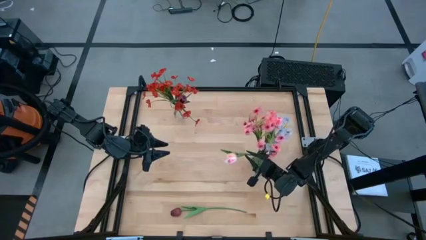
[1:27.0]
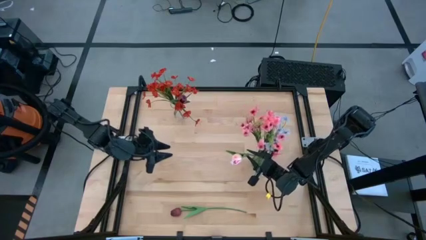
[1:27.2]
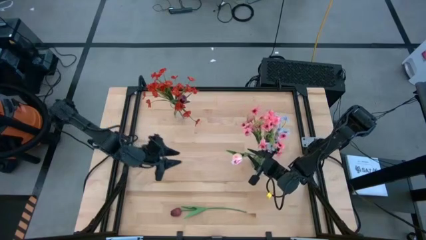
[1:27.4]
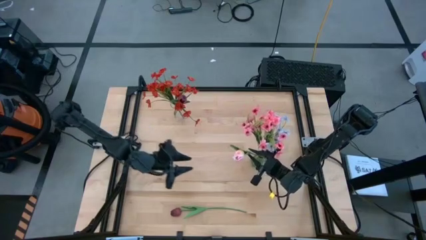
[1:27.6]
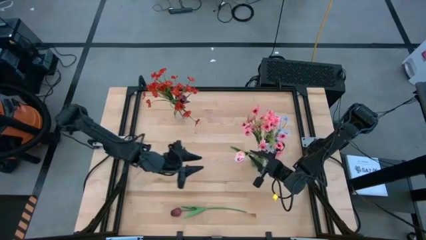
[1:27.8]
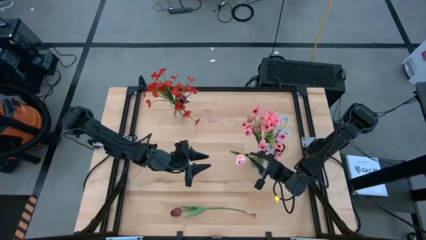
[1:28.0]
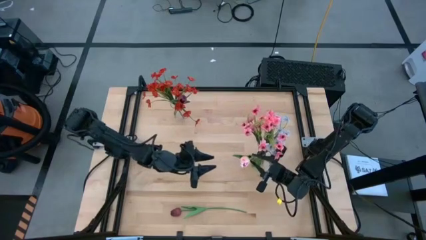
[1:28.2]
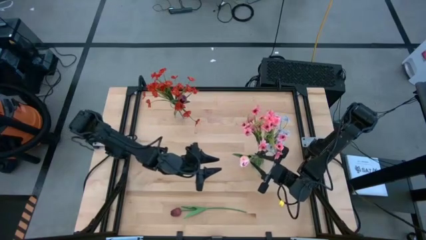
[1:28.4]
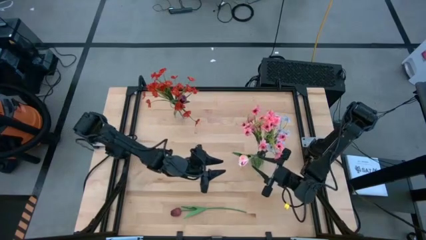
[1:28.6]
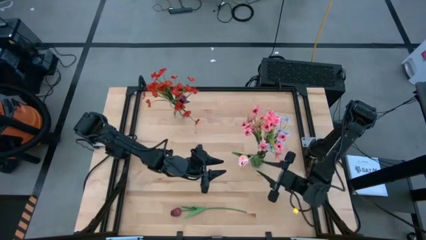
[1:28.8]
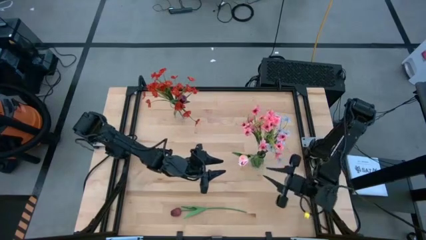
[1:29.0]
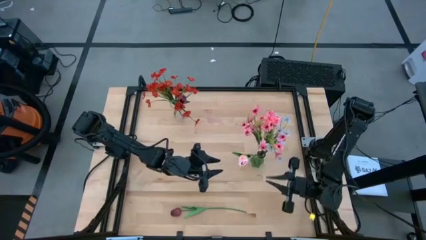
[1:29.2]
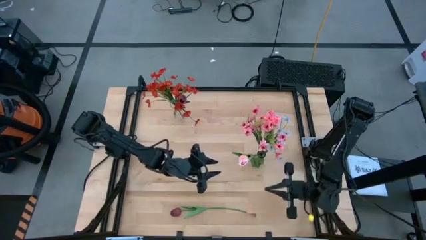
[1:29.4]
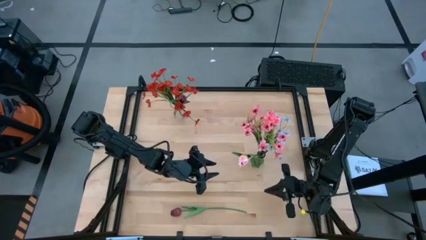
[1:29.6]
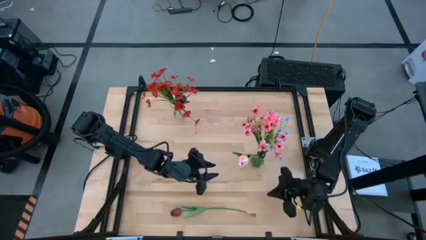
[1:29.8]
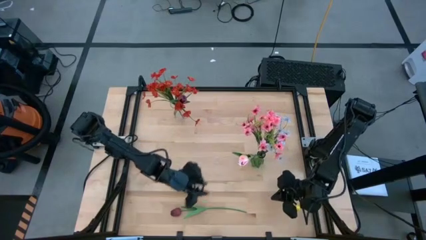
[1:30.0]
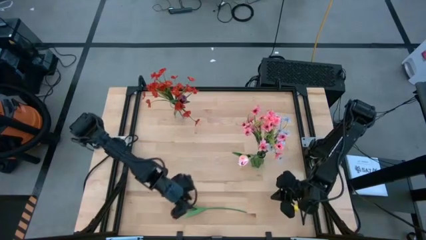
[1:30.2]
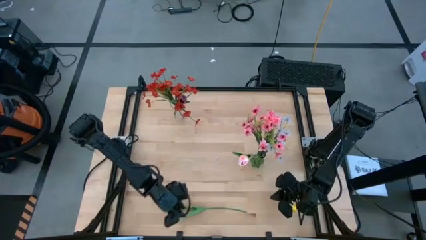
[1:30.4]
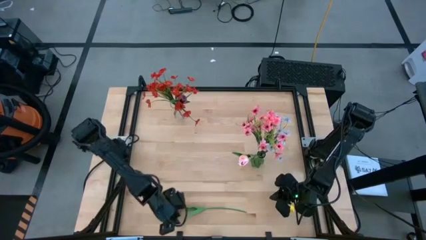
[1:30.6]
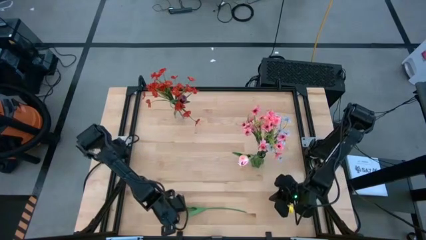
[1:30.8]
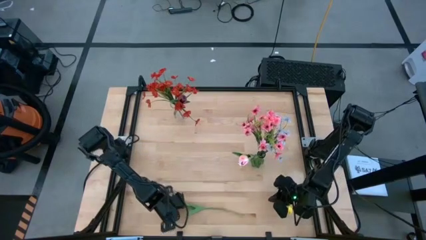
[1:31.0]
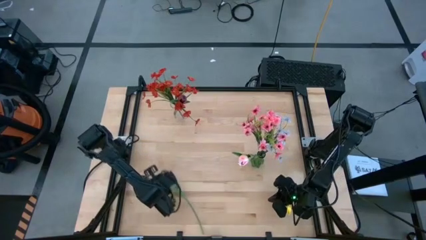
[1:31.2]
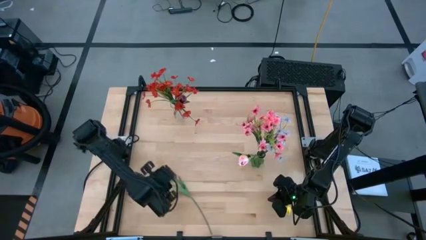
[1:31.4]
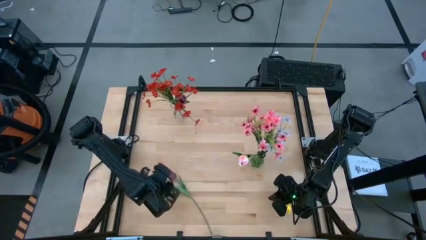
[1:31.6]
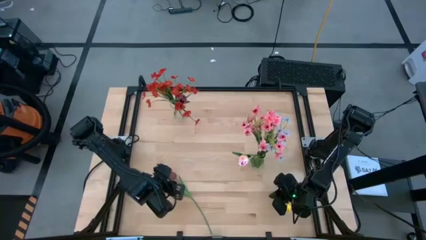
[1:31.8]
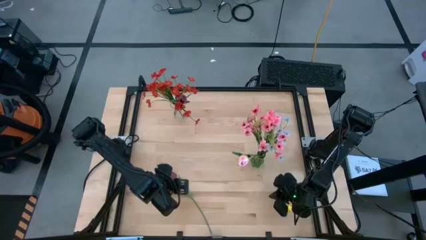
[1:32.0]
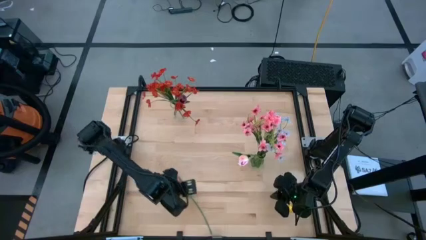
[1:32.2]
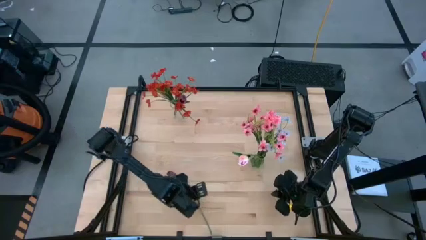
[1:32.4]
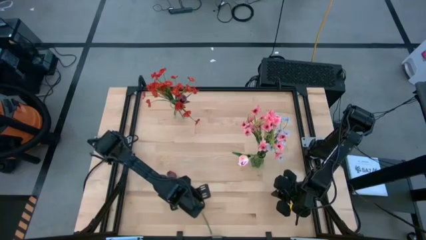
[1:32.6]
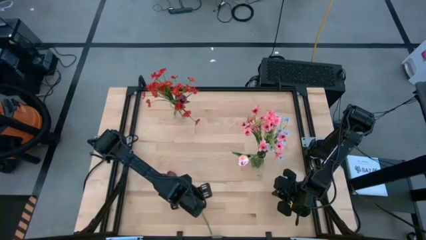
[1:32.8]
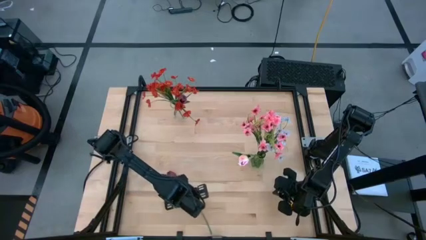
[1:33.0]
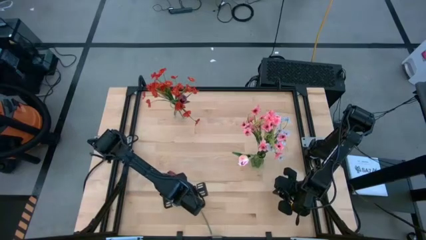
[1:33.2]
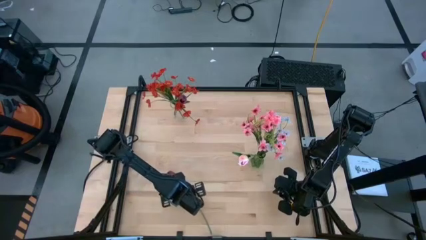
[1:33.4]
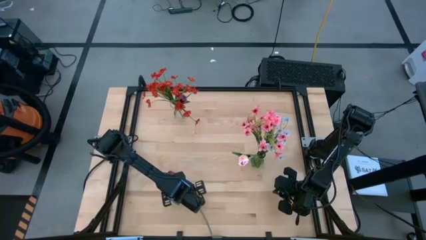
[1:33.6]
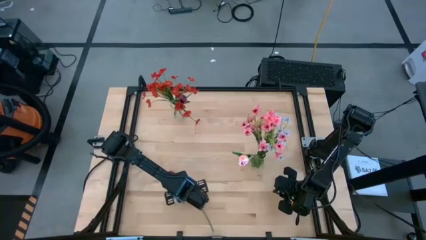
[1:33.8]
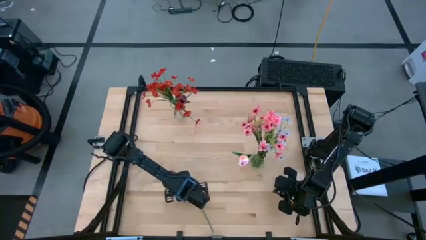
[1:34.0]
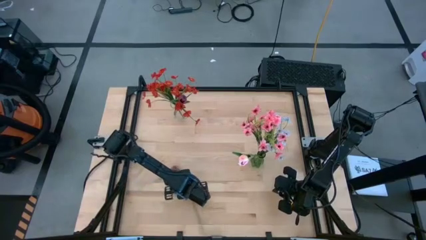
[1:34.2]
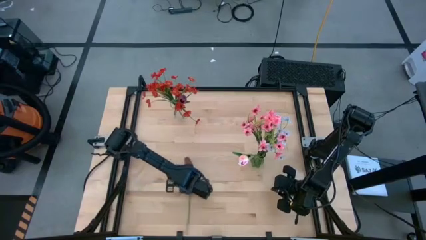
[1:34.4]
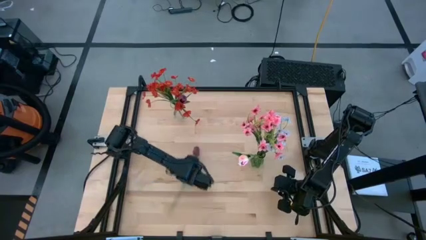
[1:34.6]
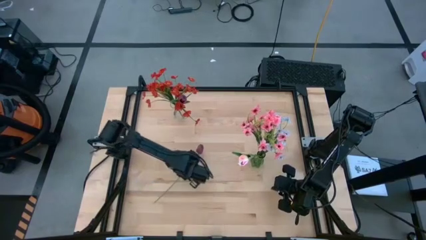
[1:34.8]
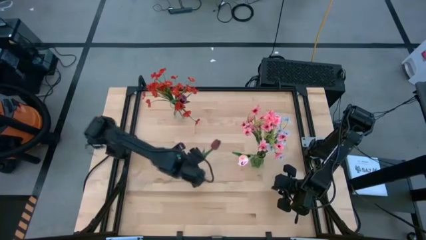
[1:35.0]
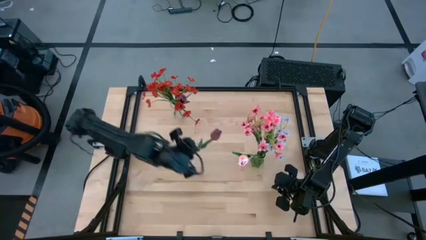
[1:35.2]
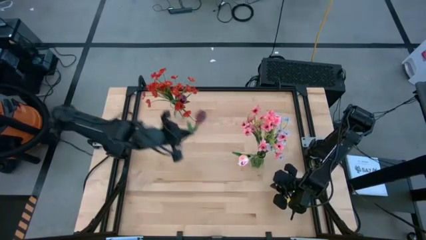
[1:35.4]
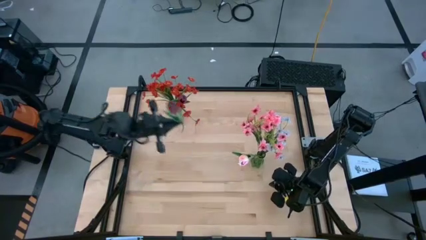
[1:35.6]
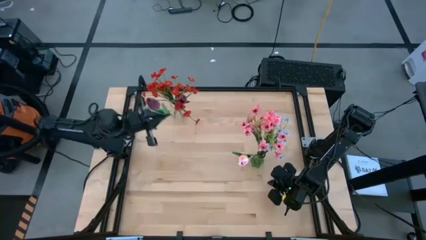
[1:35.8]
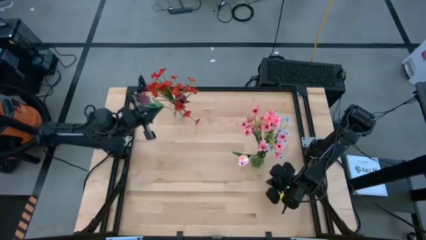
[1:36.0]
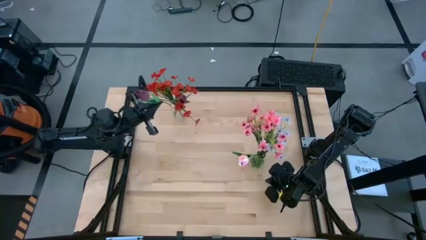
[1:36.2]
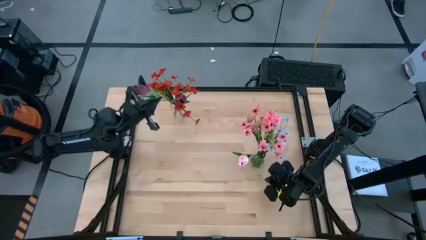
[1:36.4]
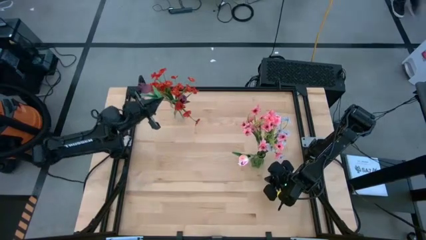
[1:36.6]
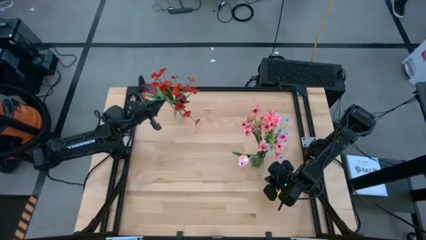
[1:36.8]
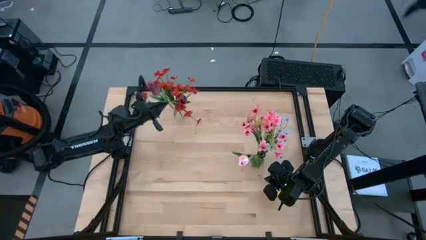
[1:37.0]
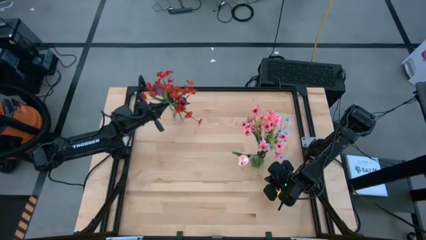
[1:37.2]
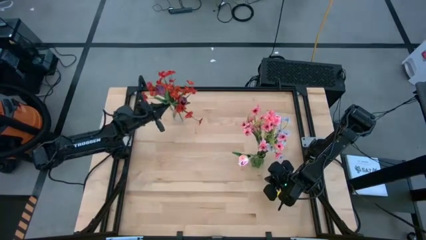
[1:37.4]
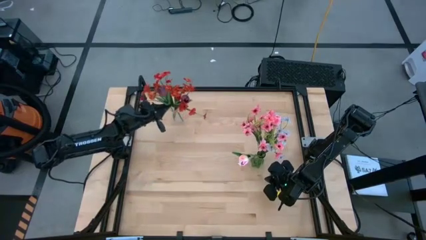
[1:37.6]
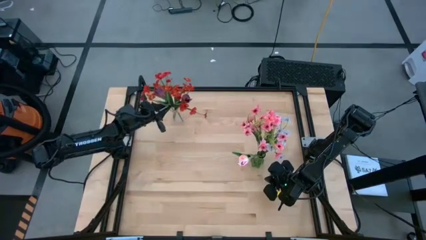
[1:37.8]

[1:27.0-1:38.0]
Task: Sort flowers into vase by color
Put the dark red flower into the transparent vase

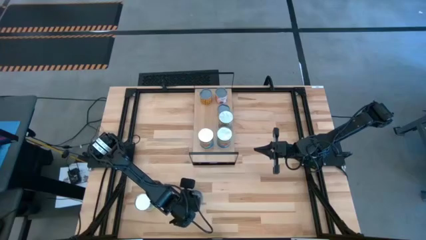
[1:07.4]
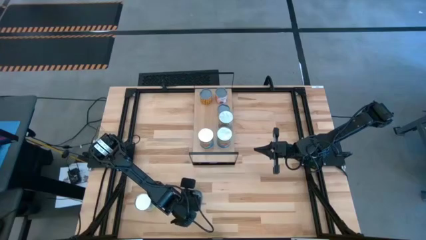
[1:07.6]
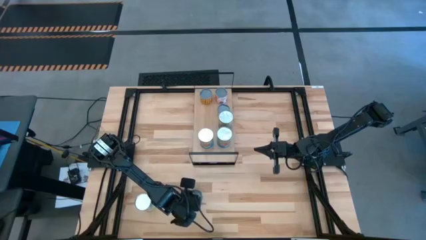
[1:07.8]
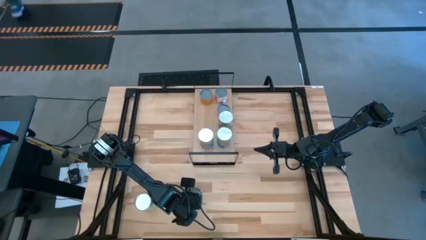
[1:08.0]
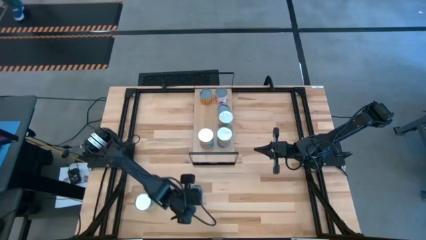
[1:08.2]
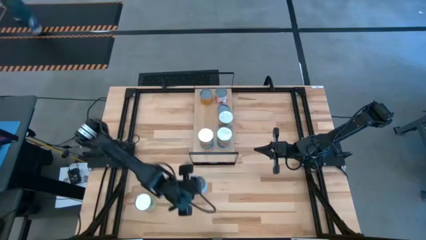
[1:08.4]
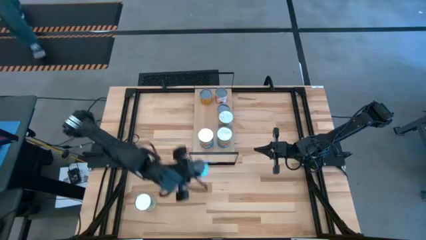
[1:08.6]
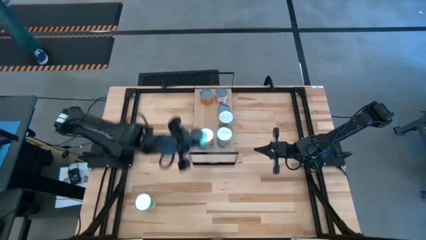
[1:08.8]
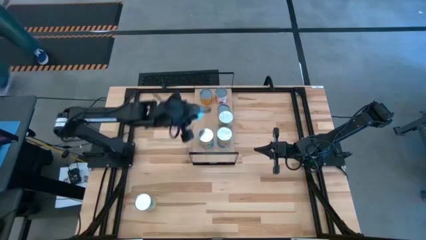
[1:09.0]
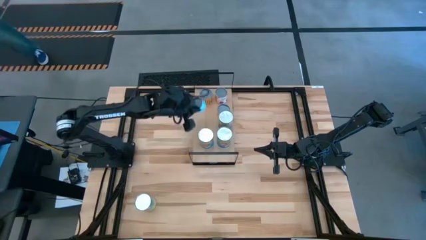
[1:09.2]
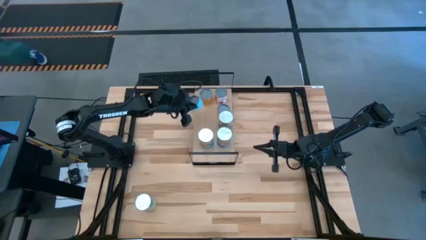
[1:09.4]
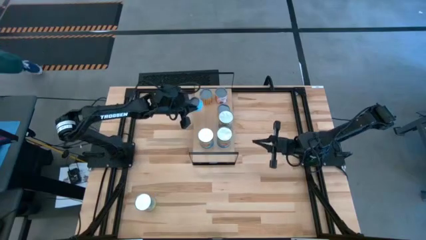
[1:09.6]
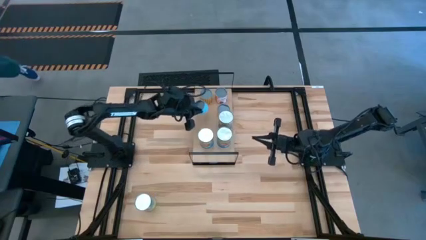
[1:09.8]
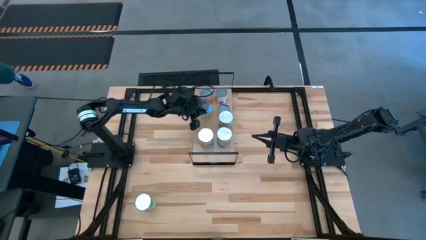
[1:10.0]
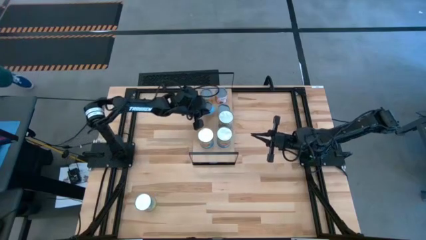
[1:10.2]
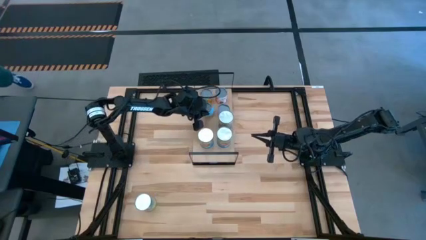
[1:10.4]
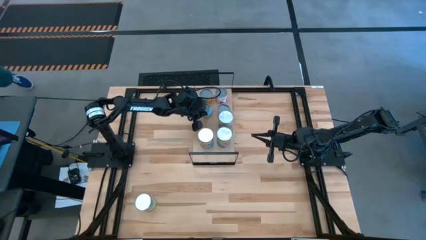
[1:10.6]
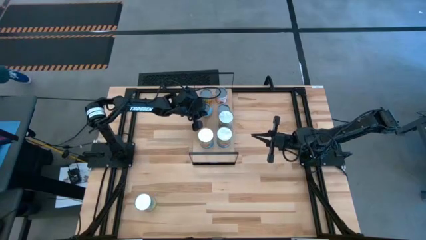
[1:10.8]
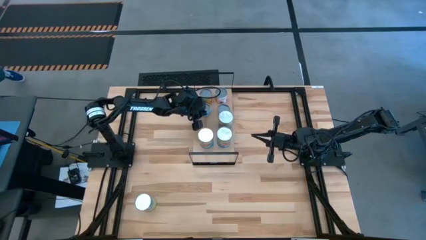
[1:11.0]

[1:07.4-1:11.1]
Task: Pick and place cans onto a shelf
Put the cans on the shelf and align them with the other cans

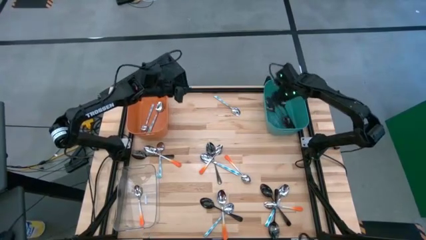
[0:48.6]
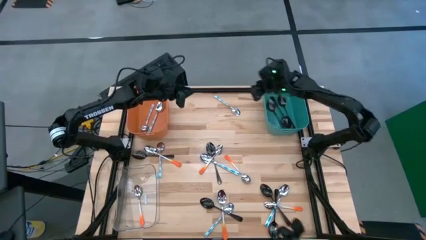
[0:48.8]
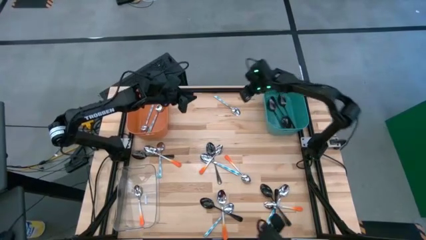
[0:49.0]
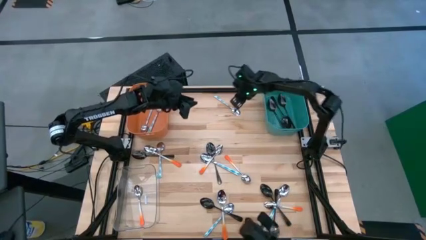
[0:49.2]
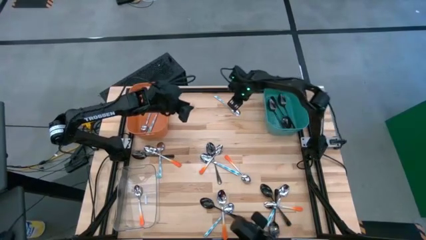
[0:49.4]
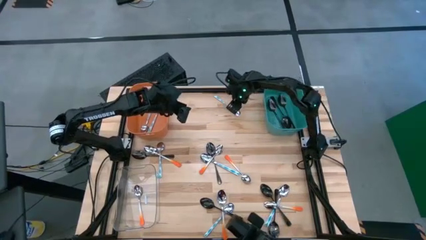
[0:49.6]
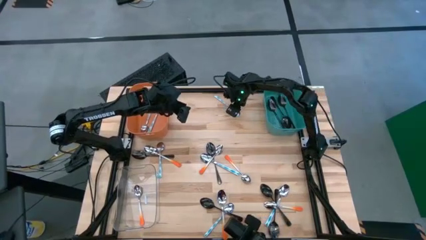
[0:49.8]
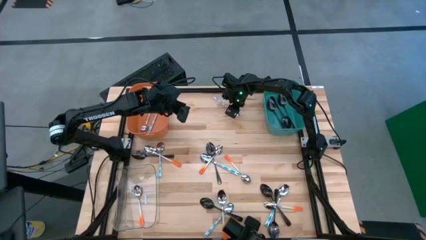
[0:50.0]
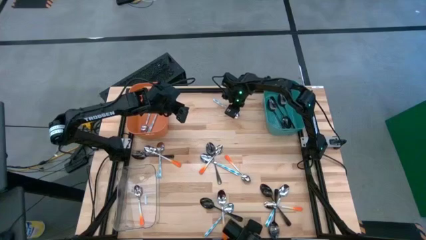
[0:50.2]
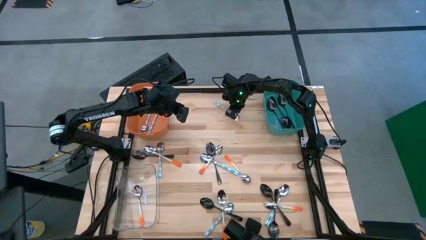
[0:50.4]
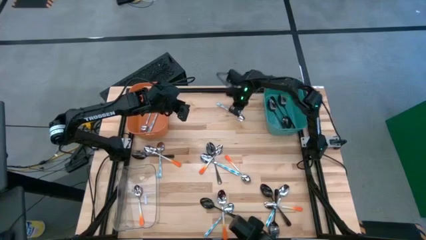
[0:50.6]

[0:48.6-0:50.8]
Task: Sort silverware by color (type)
Put the white blue spoon into the orange bin
